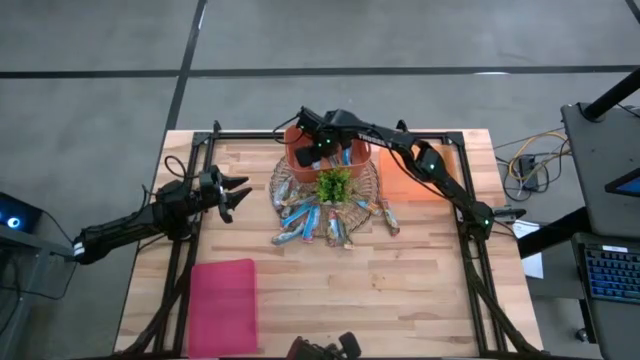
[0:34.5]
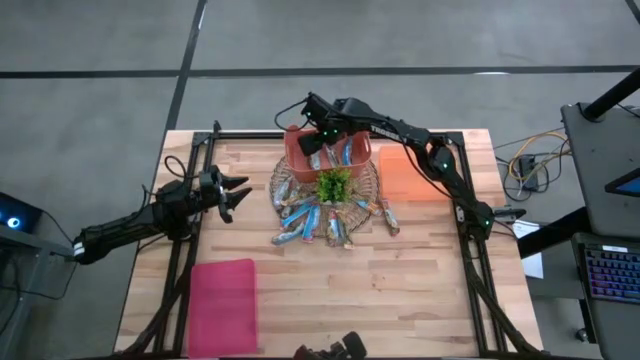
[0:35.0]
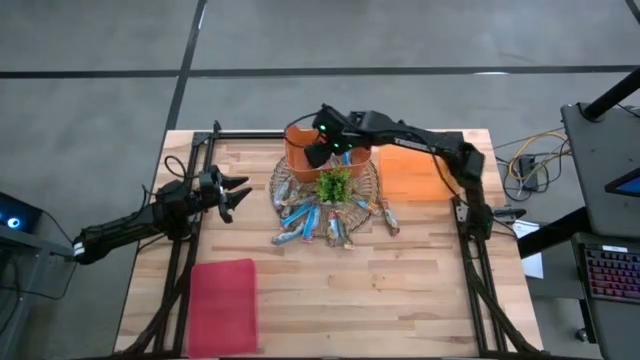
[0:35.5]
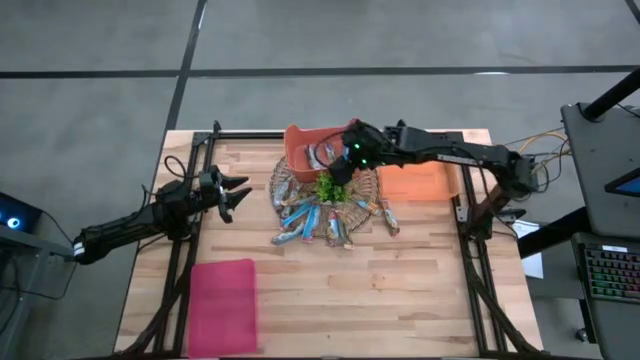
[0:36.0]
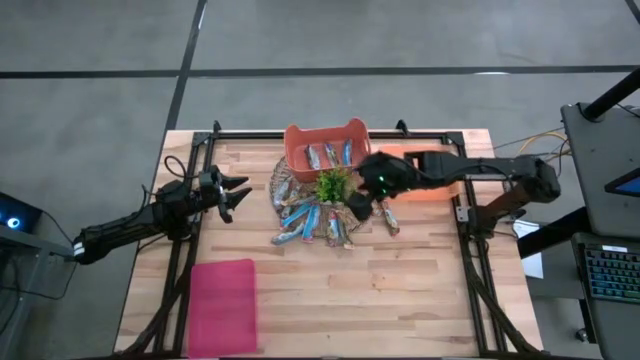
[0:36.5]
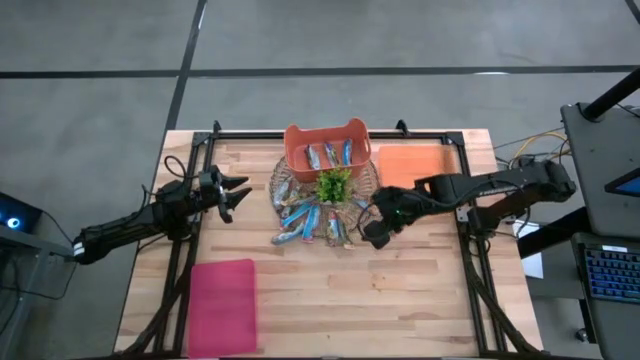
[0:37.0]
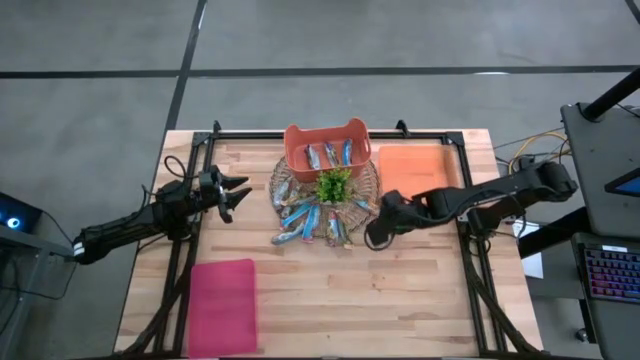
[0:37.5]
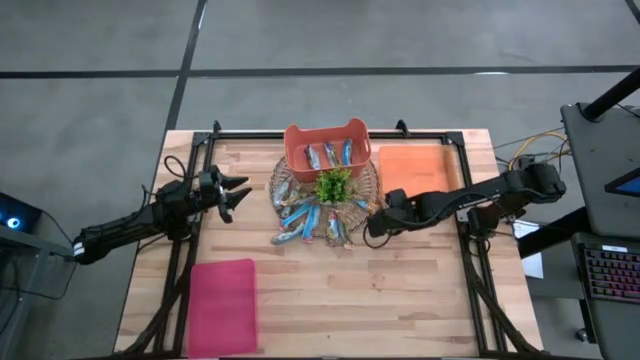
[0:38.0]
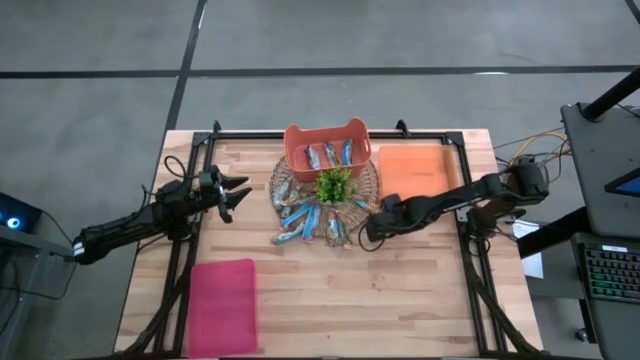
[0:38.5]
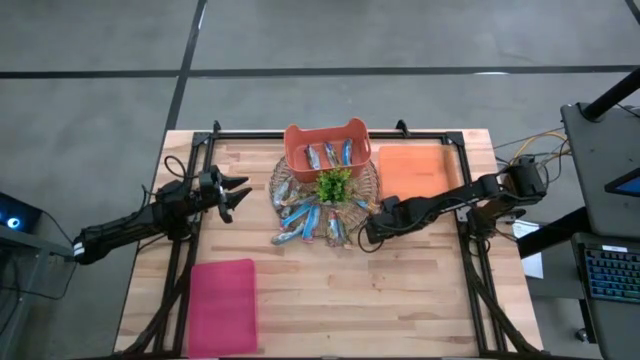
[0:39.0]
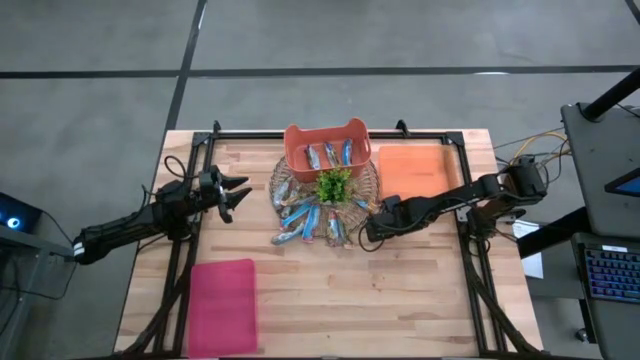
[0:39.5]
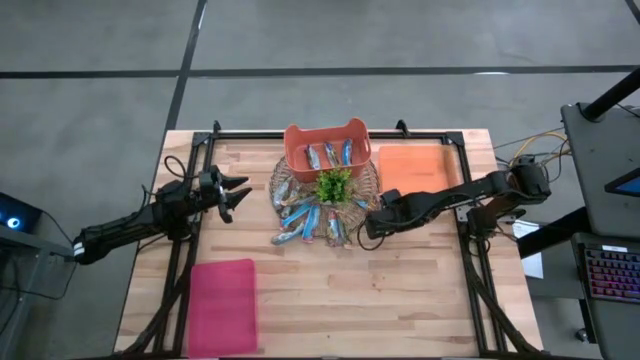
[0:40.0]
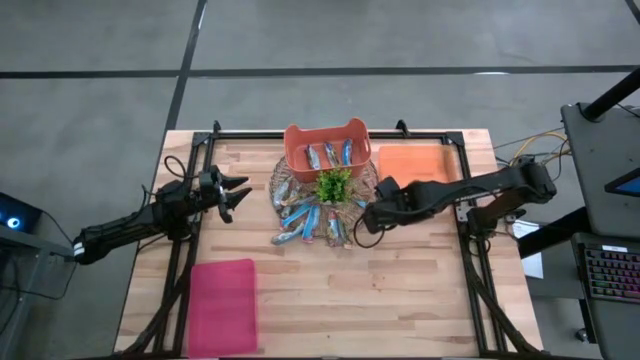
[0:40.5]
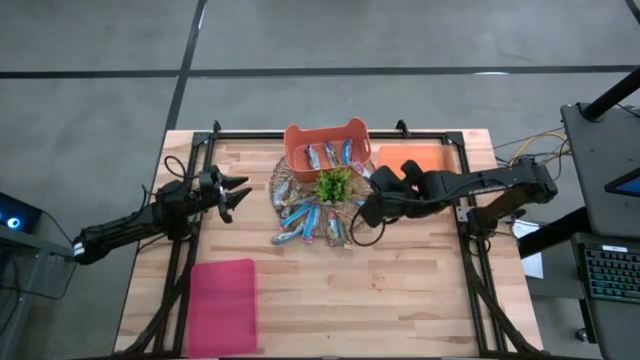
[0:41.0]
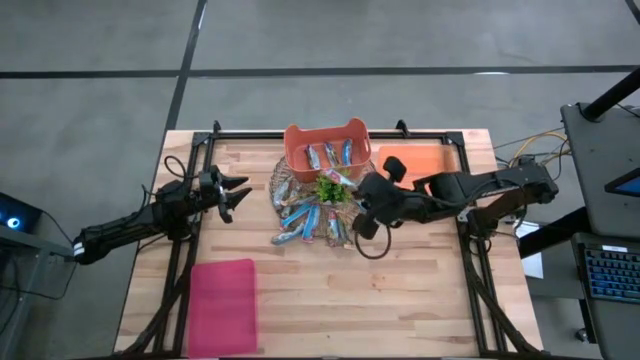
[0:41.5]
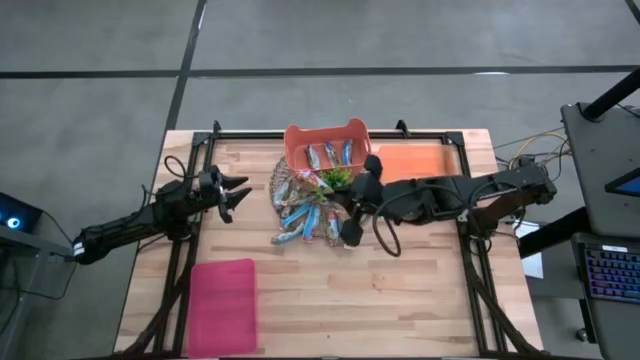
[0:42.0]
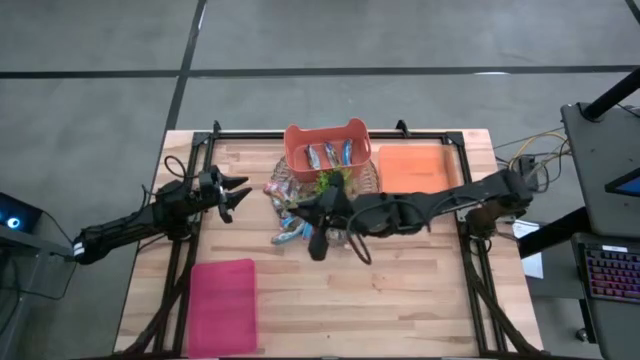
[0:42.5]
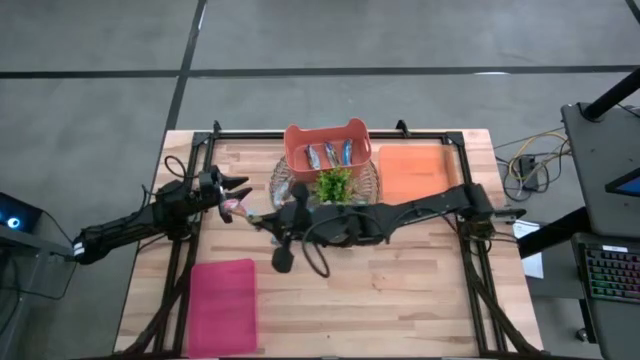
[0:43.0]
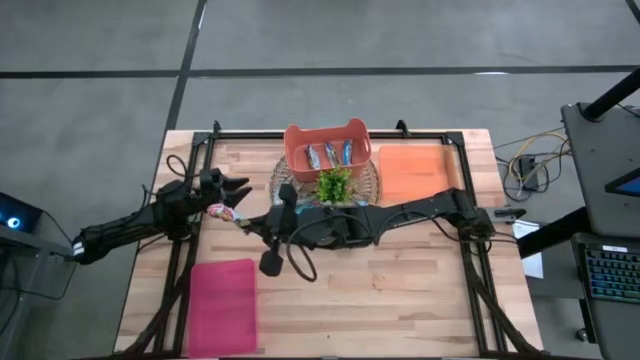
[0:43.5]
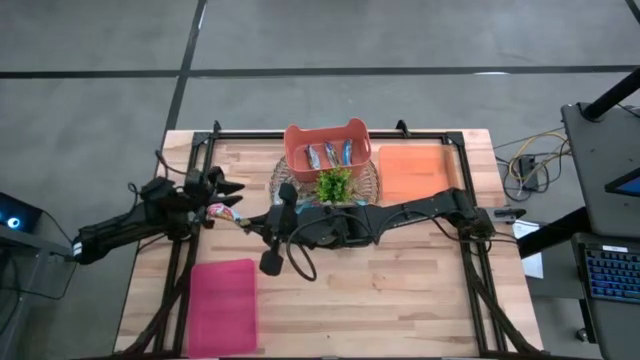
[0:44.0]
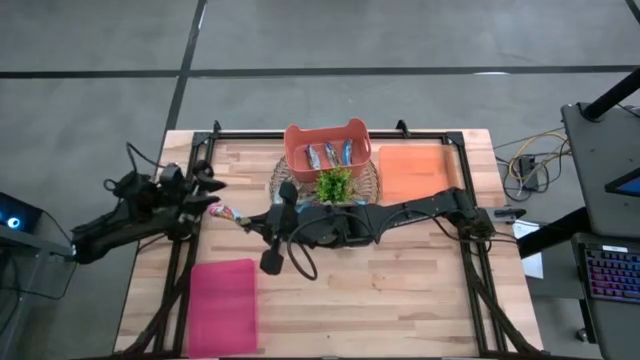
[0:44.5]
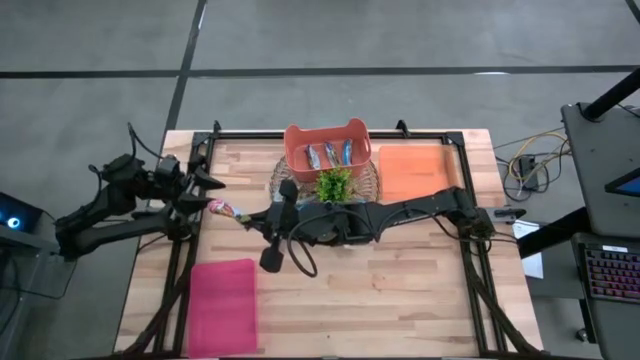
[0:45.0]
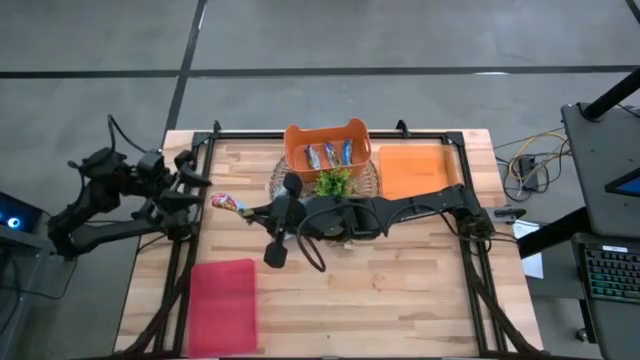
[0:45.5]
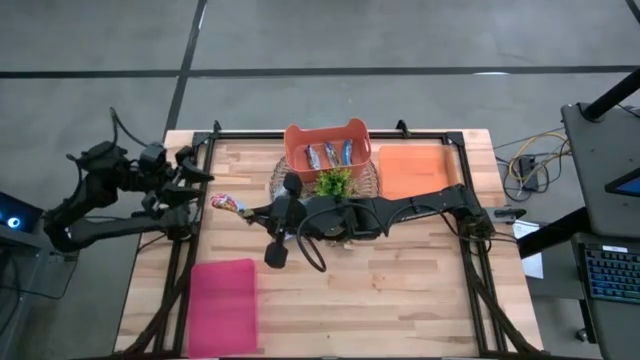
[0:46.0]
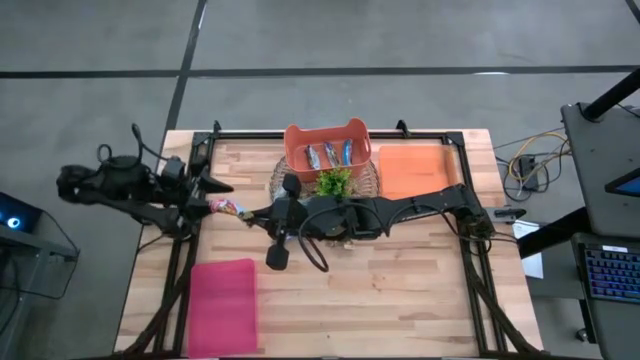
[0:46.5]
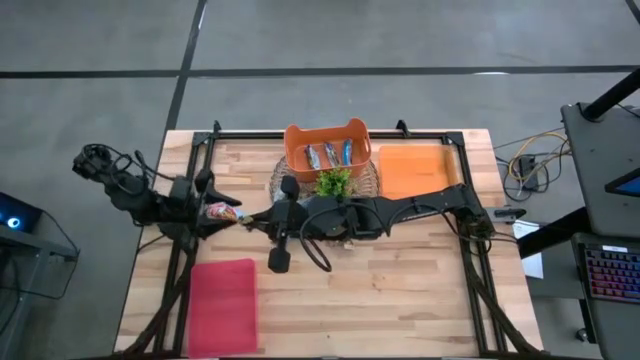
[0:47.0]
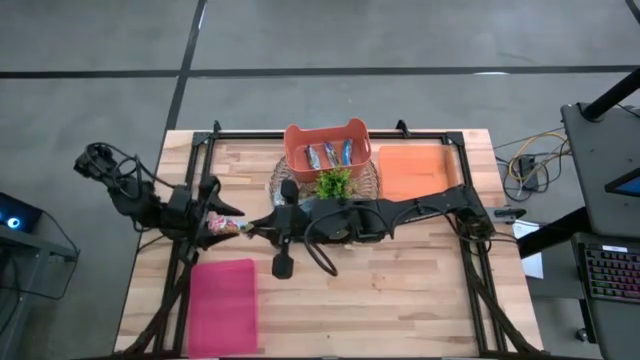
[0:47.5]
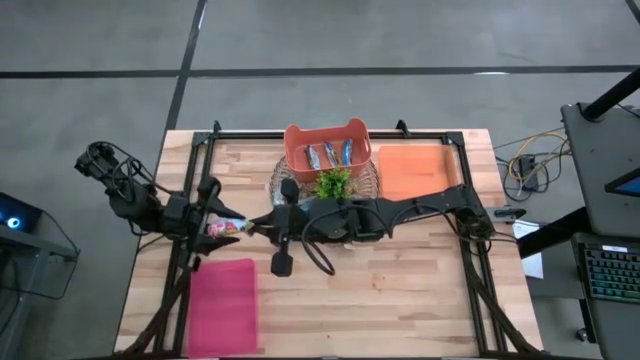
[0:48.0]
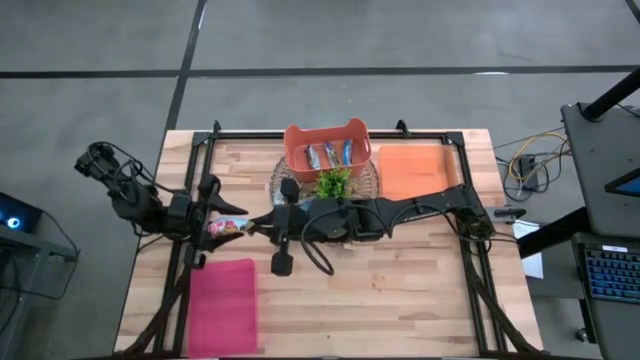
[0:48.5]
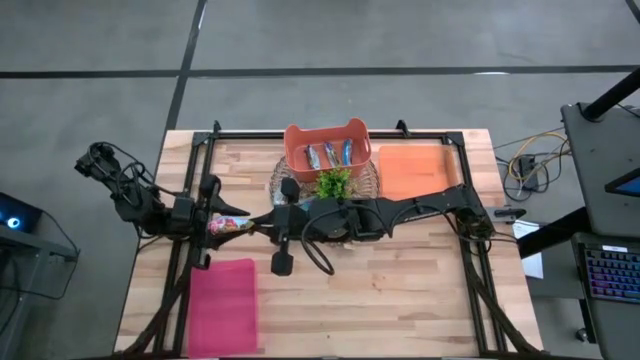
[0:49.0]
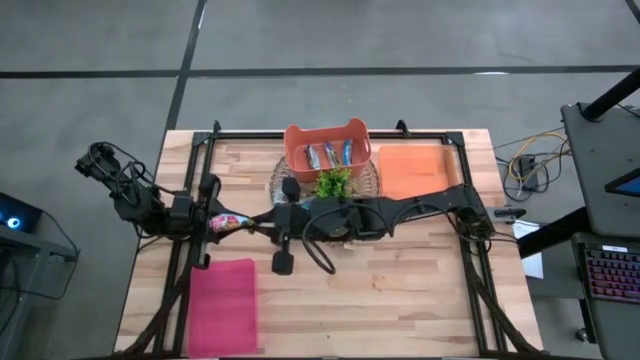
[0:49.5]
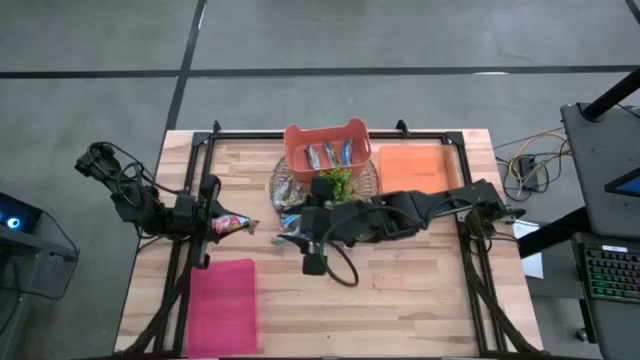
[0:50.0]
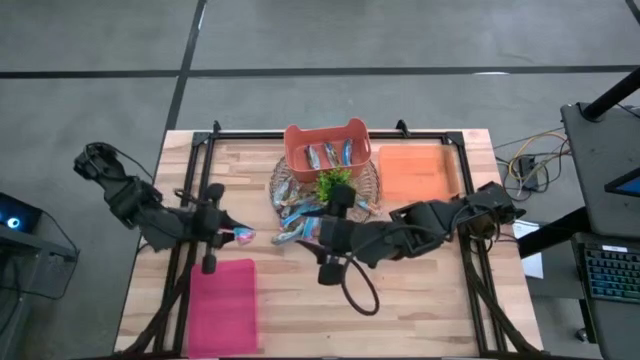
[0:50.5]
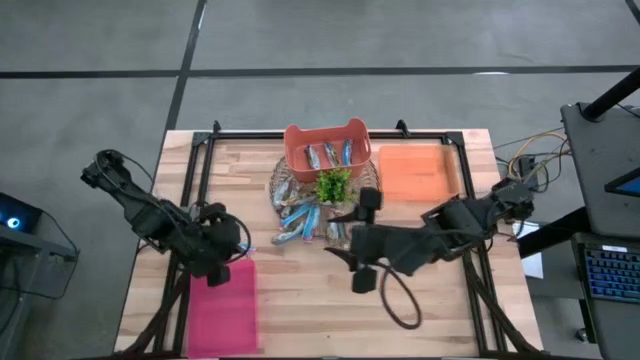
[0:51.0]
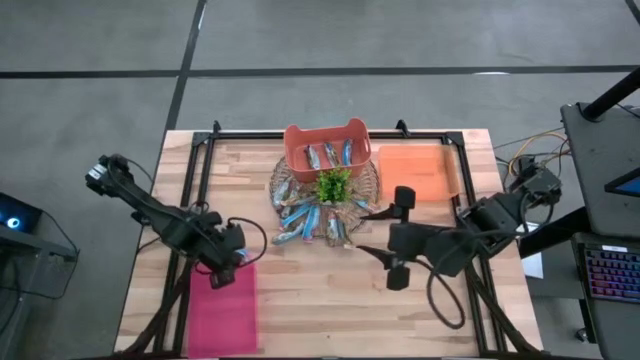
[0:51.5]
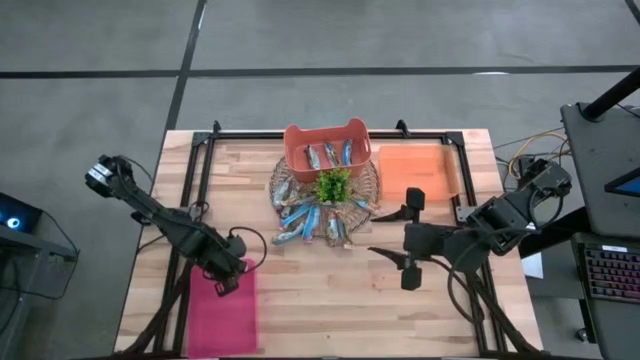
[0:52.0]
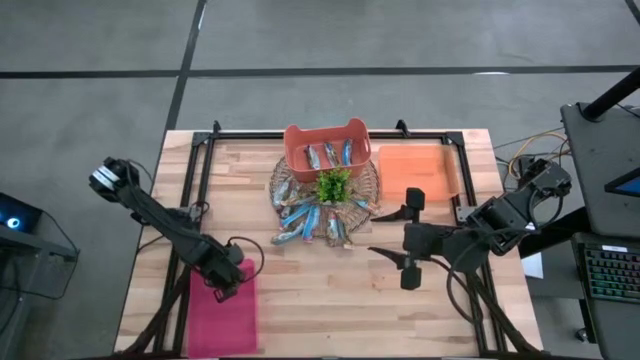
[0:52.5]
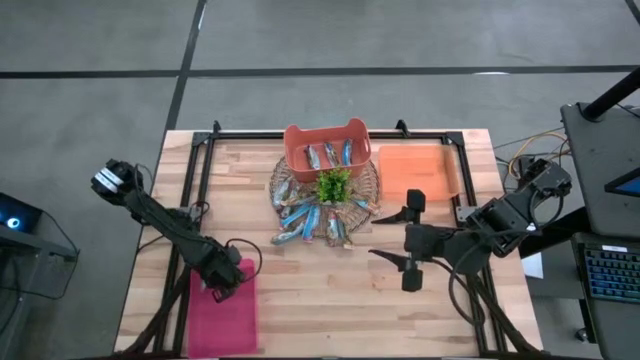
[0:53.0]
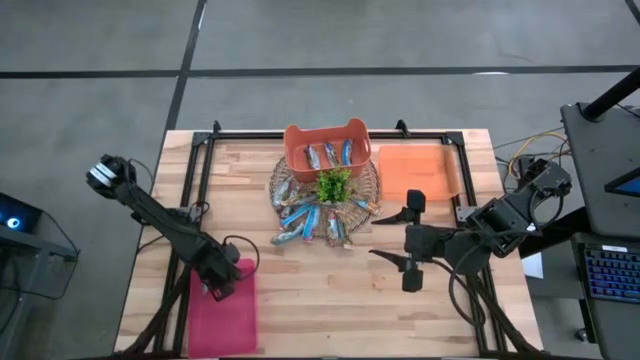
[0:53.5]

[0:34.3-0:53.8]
Task: Pick and place Granola Bars by type
Put the red granola bar into the pink bin

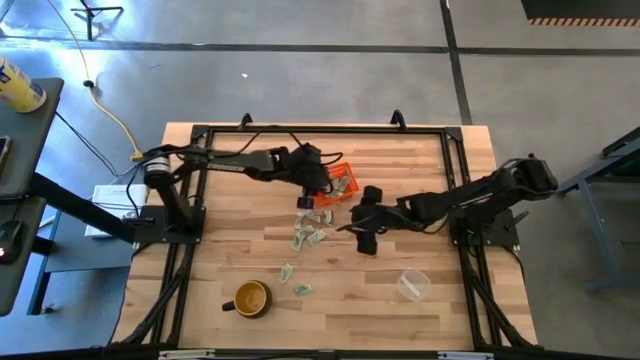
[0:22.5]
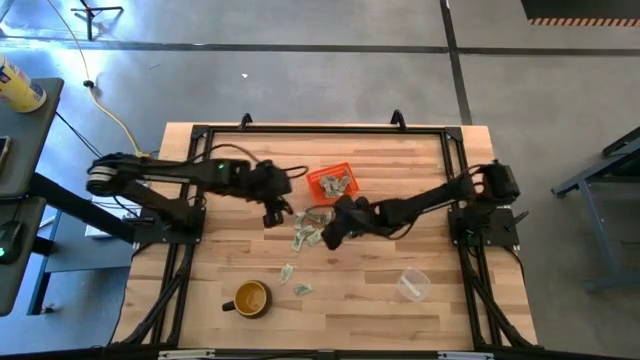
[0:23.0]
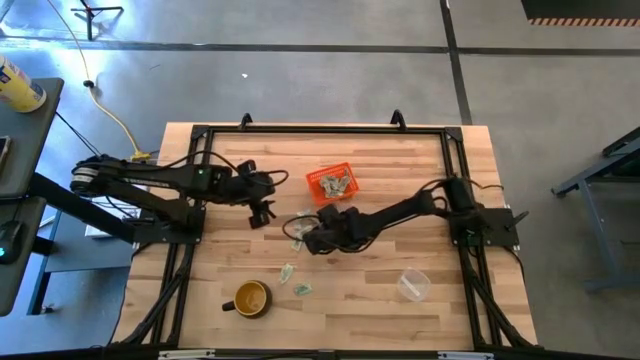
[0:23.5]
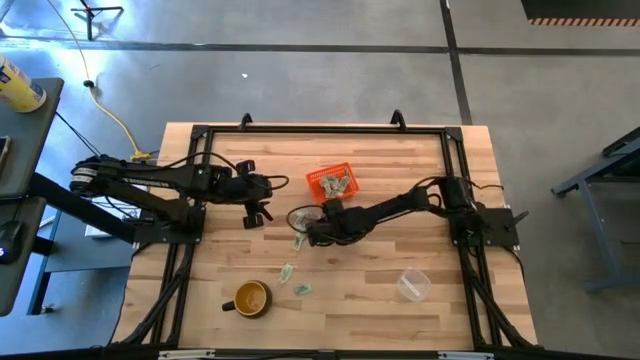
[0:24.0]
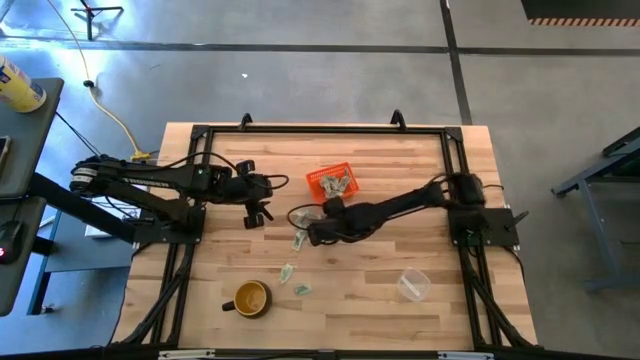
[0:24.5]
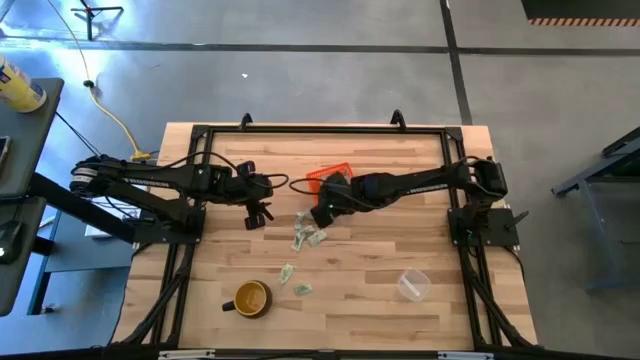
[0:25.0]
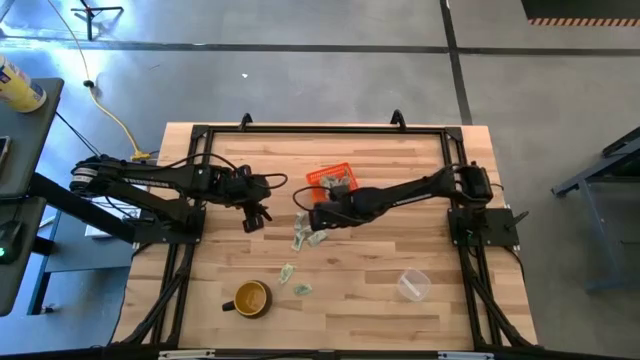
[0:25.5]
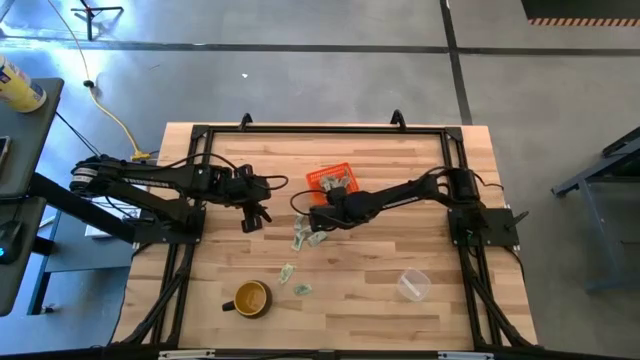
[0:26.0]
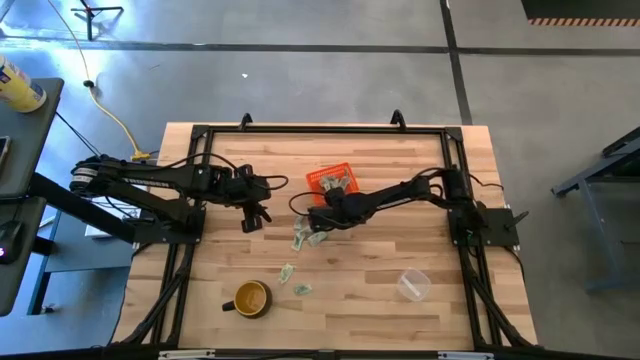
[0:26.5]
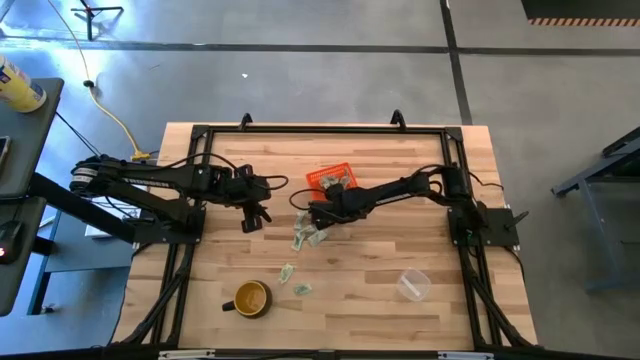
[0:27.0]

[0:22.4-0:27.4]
Task: Pick and place items into bin
Put the green stevia packet into the orange bin
